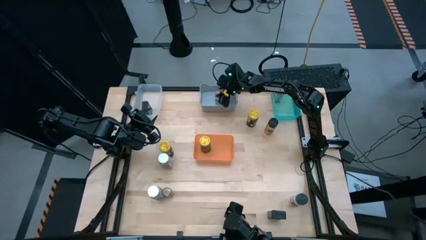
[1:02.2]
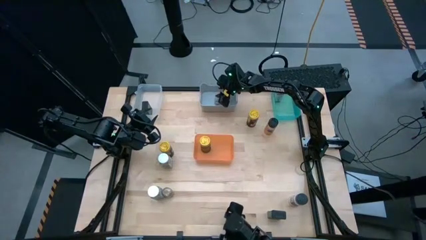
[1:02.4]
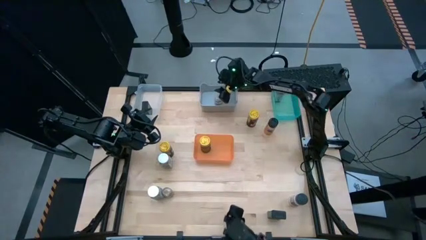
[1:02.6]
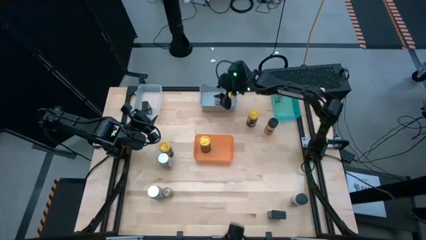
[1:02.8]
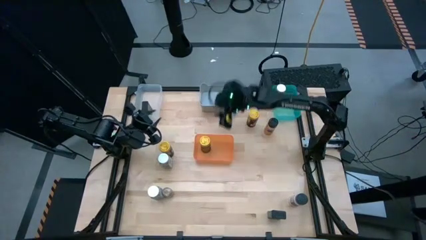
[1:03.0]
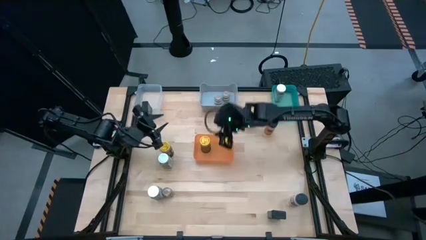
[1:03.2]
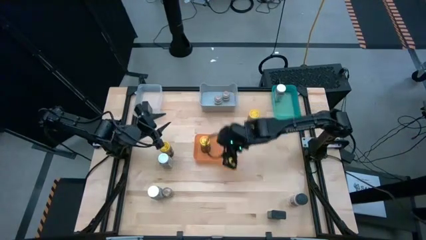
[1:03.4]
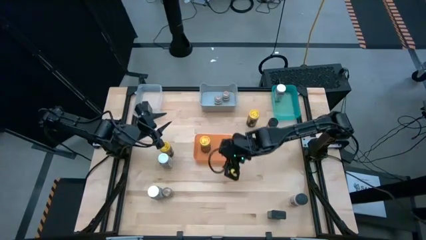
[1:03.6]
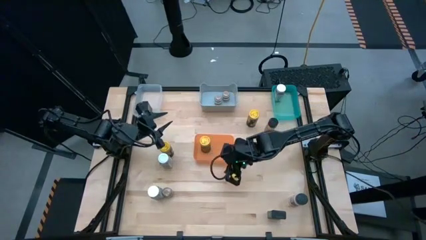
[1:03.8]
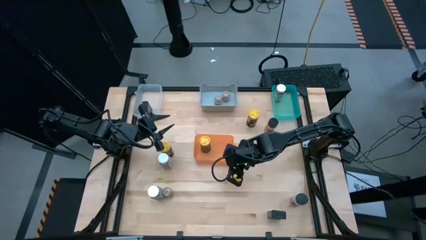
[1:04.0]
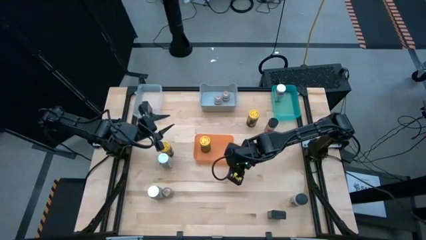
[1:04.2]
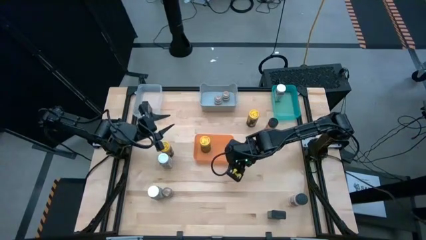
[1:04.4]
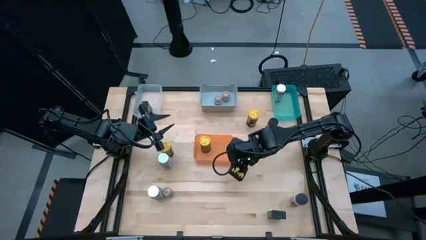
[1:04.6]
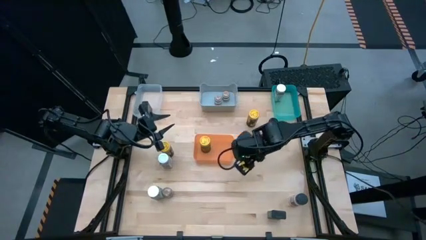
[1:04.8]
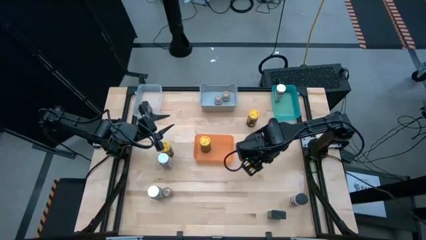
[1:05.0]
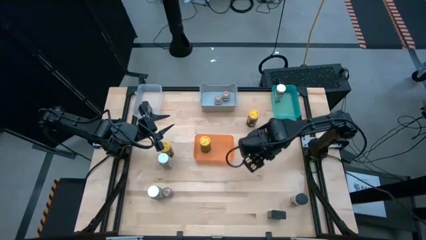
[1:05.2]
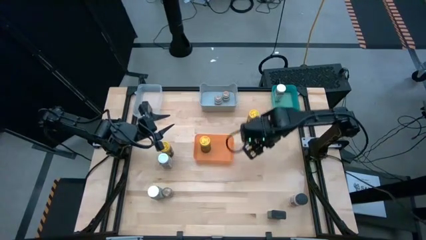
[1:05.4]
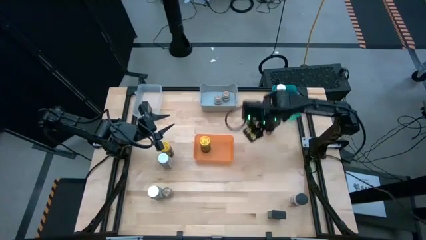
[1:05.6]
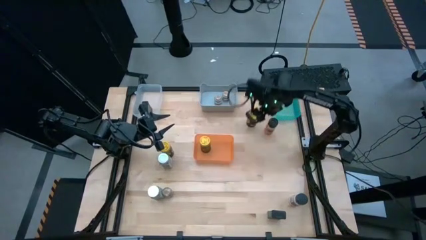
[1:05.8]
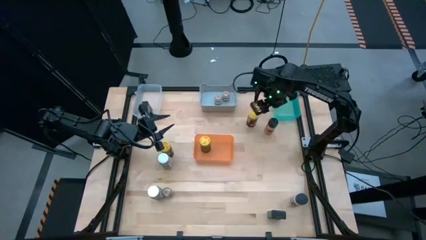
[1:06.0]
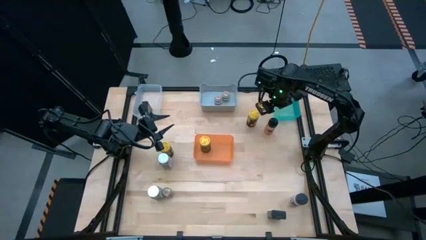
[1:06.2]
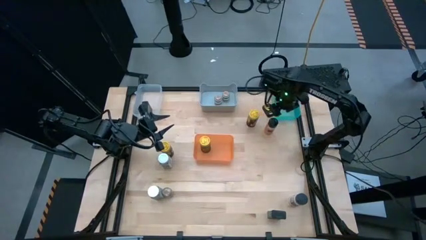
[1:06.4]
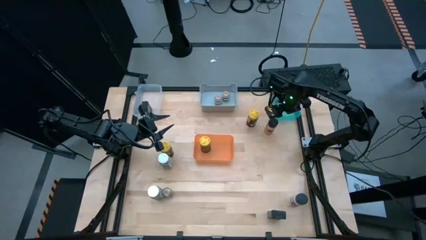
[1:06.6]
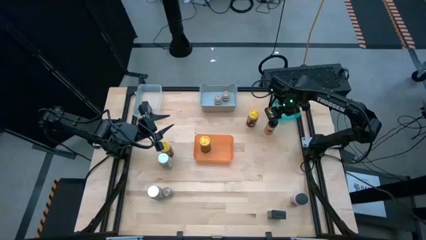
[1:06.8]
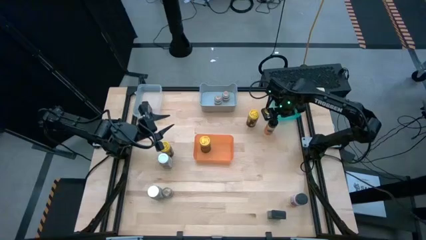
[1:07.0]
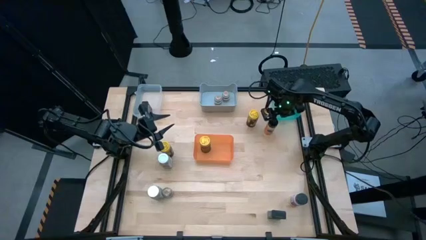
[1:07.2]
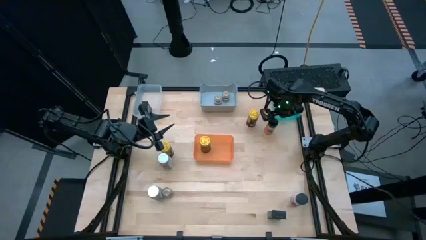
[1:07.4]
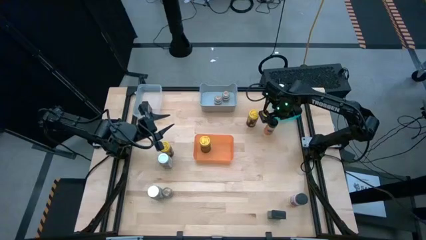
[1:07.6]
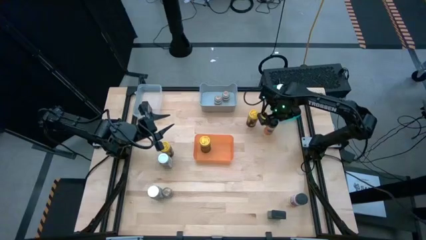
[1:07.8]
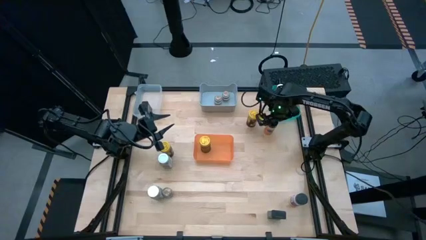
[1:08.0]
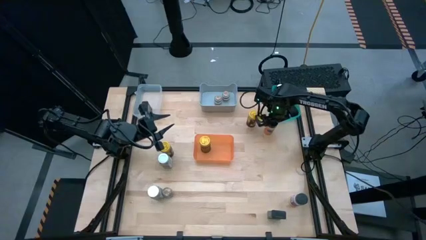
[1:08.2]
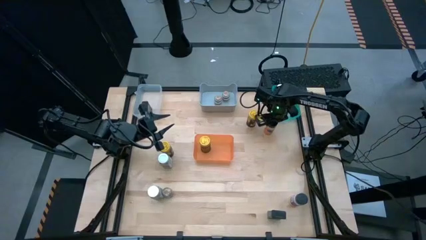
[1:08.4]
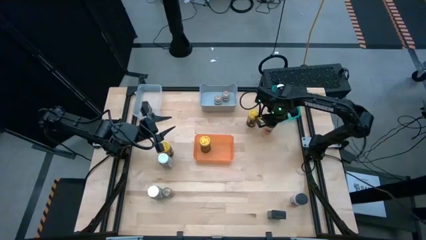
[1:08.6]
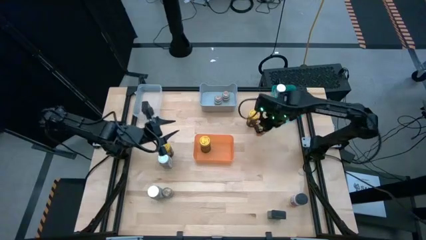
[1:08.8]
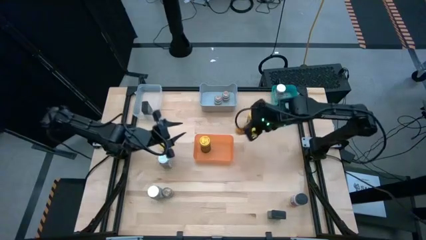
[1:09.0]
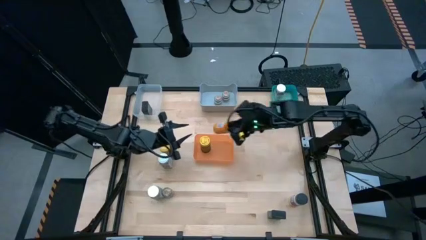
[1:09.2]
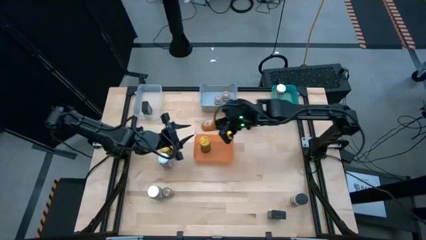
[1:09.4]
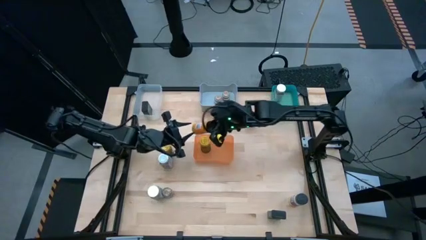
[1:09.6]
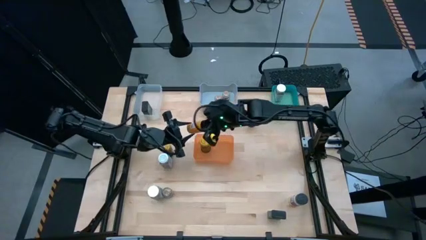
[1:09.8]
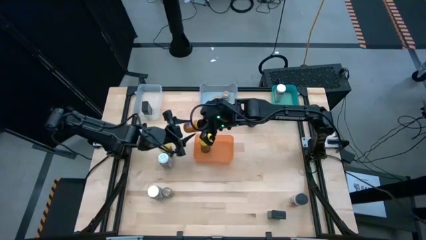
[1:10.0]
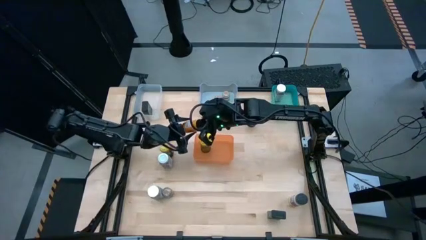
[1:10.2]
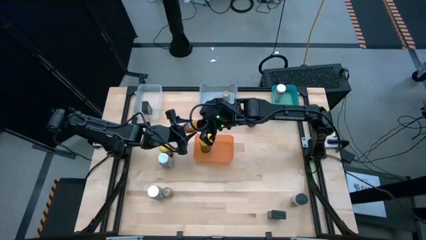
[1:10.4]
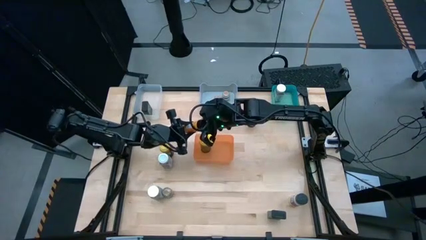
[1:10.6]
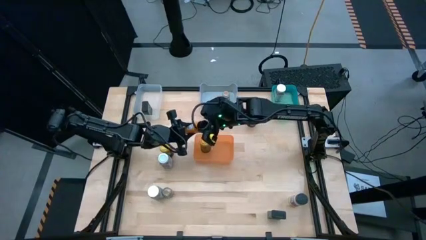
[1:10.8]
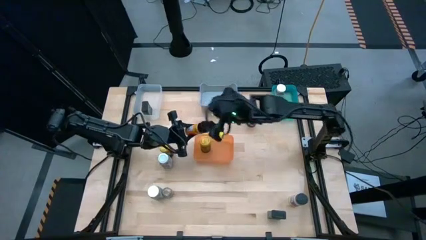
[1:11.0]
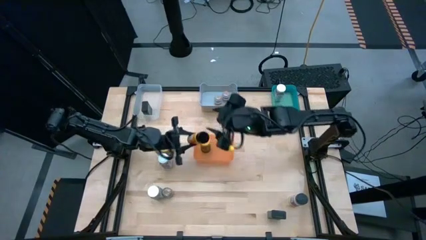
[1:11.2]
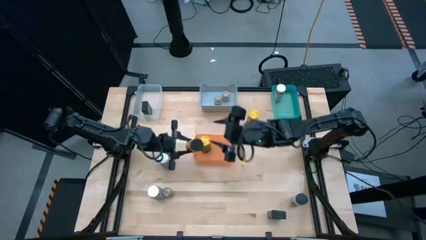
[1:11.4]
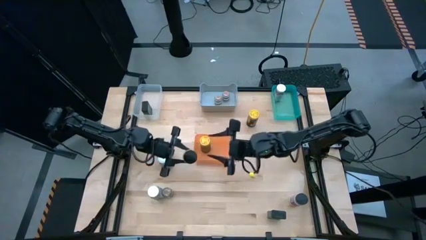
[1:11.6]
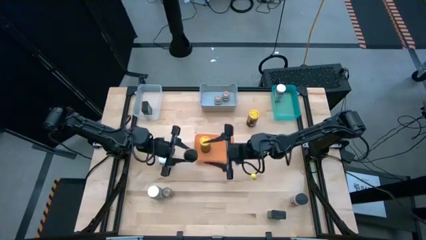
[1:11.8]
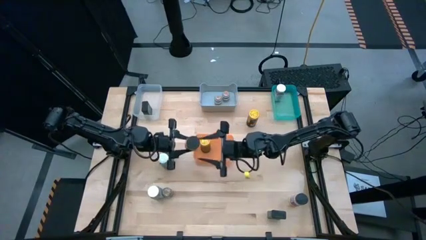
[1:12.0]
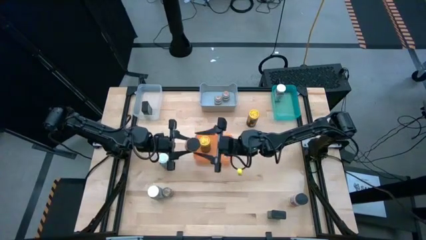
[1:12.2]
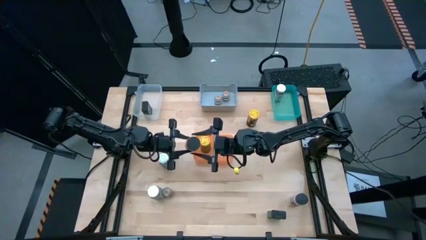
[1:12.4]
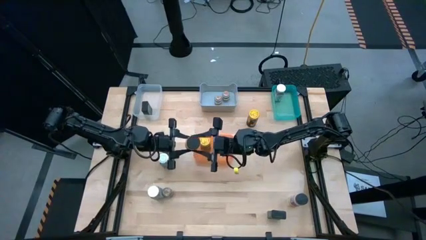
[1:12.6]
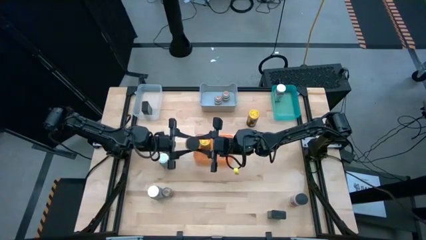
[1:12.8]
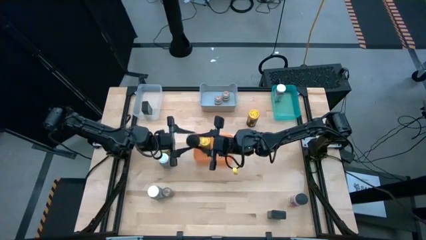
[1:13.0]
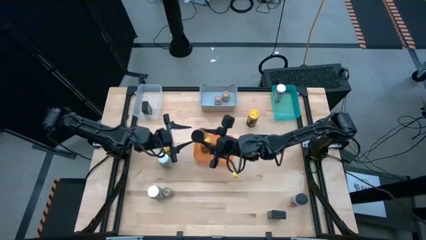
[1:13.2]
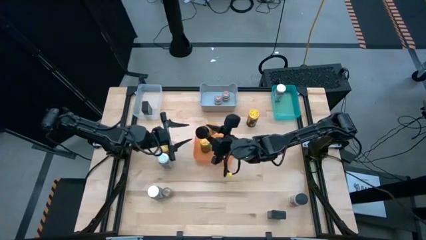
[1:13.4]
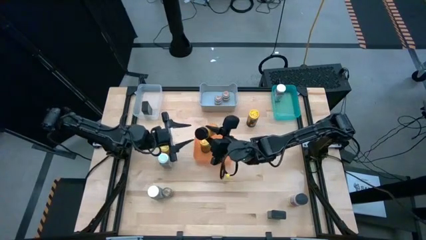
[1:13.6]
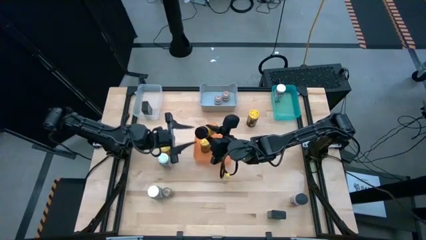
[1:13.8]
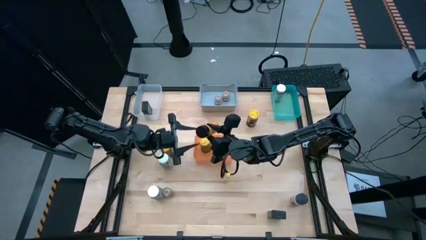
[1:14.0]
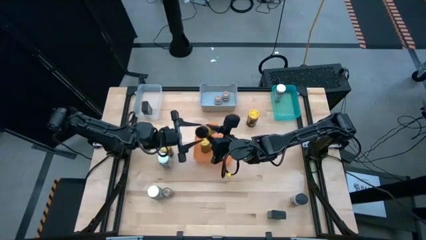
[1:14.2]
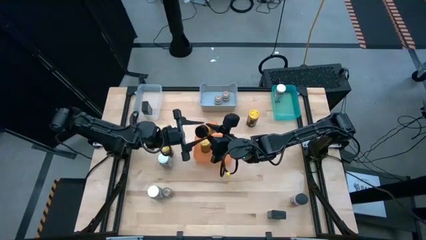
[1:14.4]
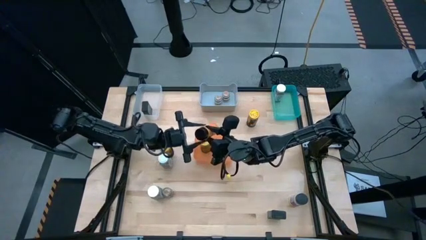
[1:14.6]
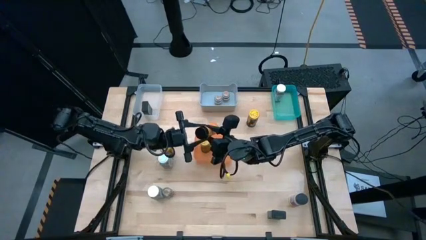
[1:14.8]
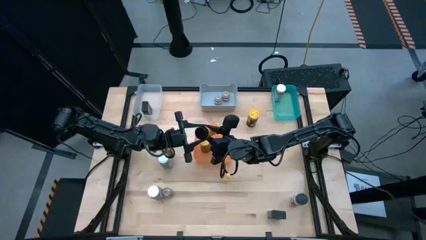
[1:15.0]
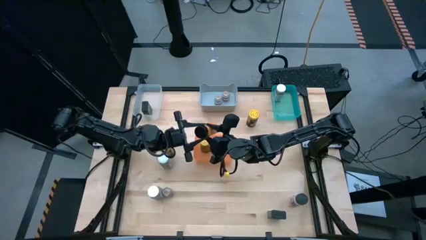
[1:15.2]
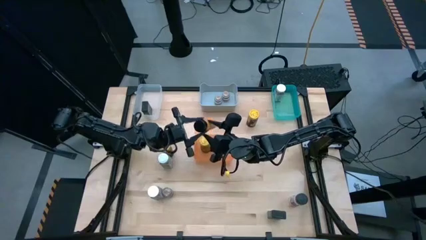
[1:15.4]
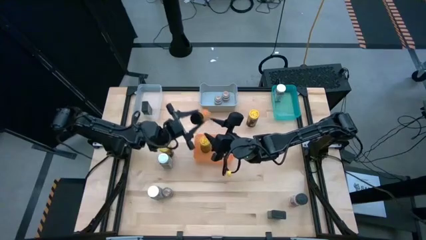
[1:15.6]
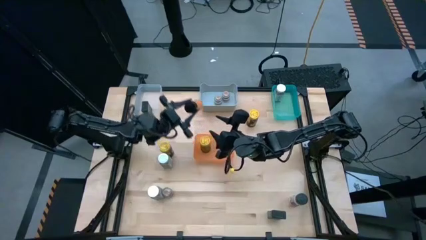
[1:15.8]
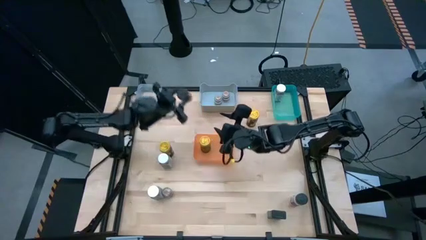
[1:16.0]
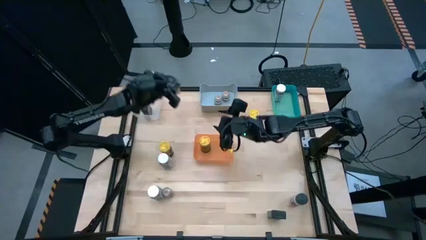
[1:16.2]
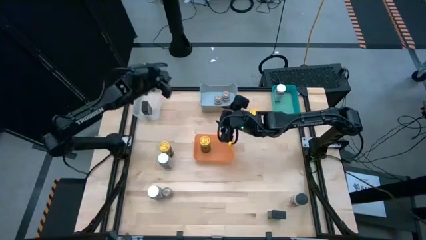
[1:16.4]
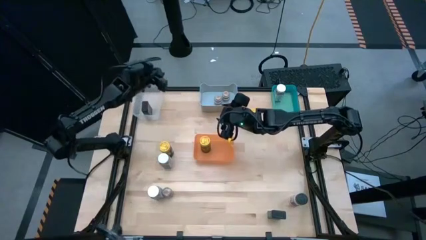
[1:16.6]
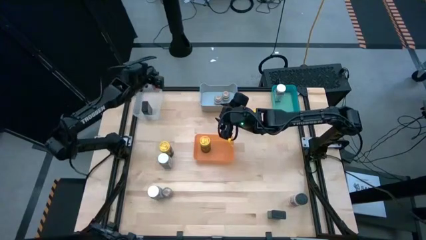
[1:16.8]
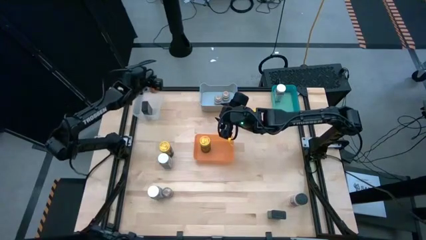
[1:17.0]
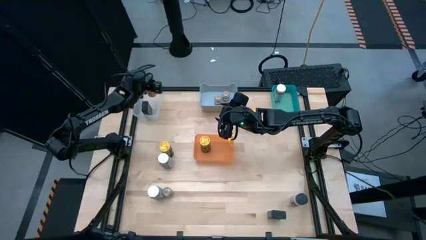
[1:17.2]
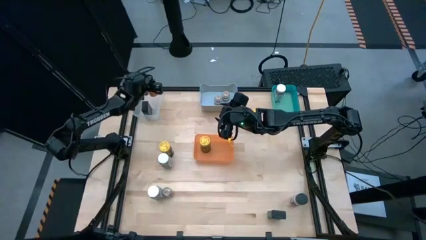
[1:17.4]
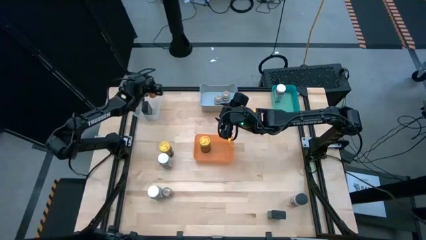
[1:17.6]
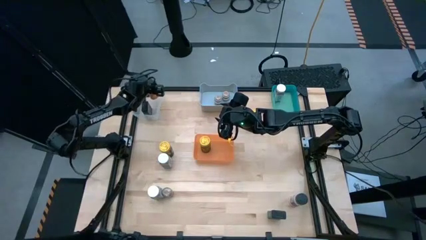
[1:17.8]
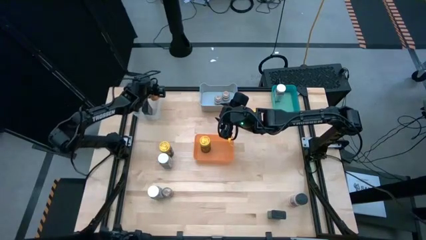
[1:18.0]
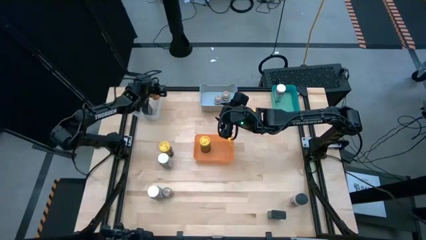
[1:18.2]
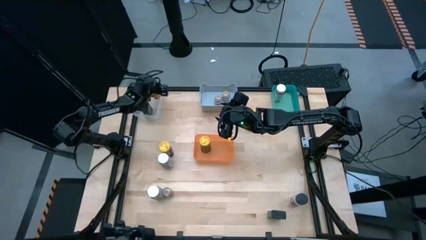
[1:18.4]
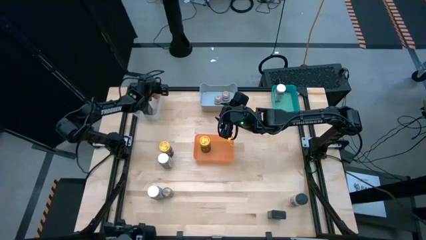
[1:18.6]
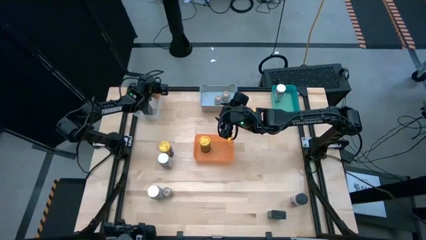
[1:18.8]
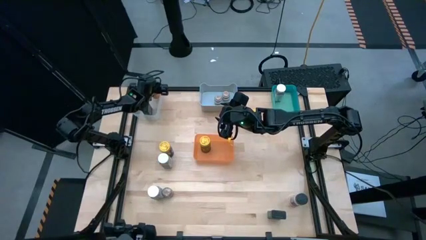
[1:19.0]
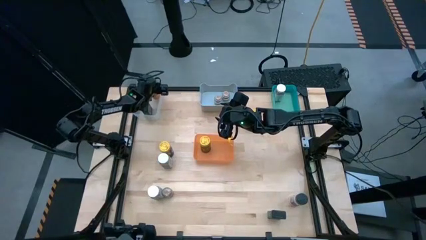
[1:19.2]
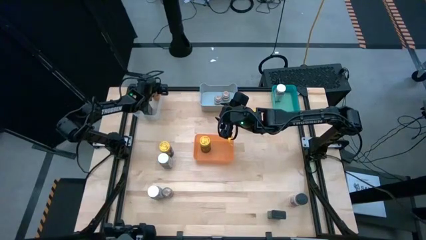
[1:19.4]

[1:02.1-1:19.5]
Task: Sort spices by type
Put the orange seasoning bottle into the transparent bin
